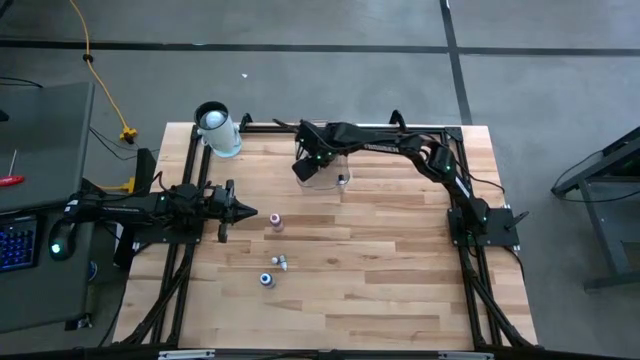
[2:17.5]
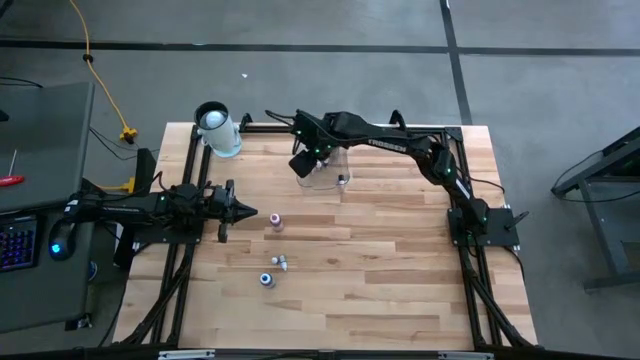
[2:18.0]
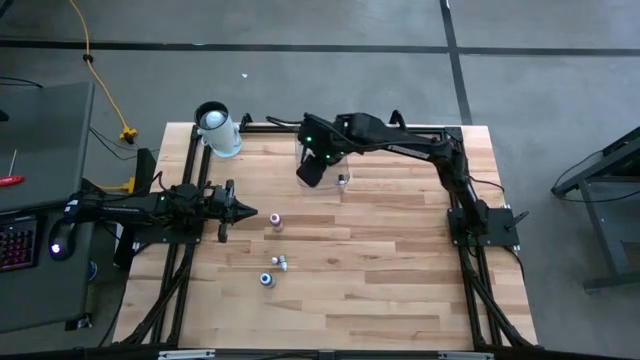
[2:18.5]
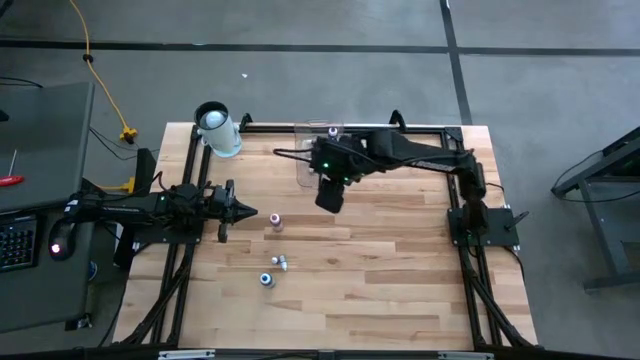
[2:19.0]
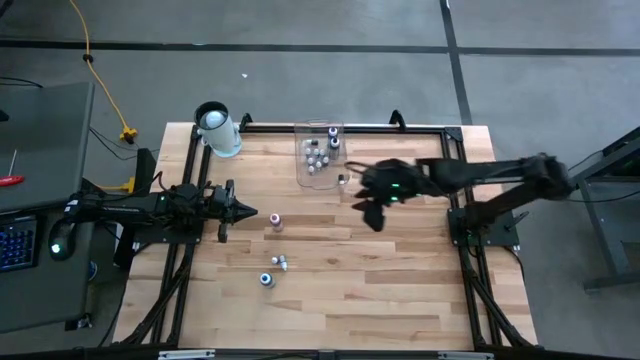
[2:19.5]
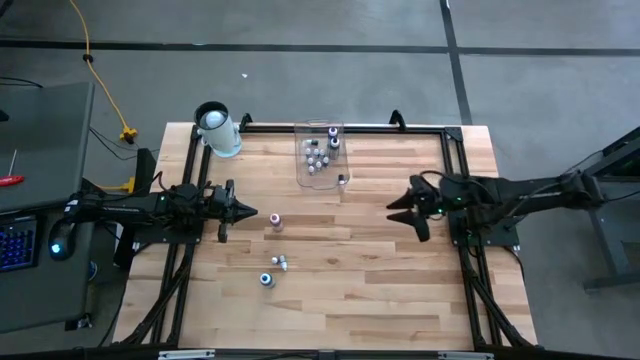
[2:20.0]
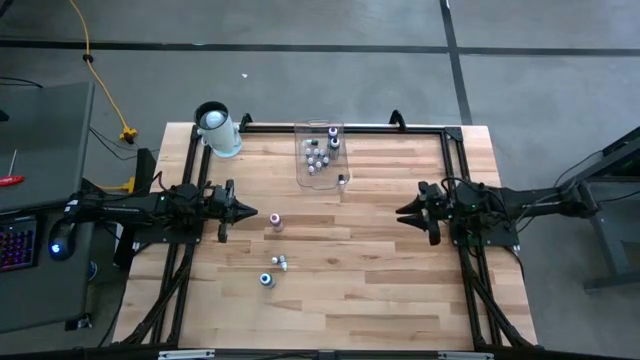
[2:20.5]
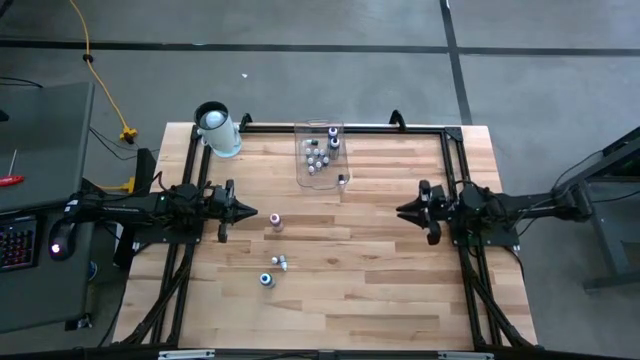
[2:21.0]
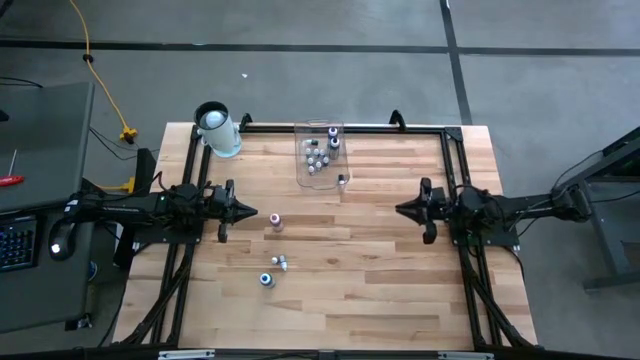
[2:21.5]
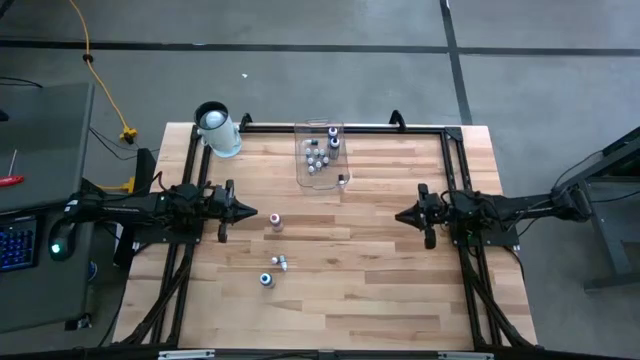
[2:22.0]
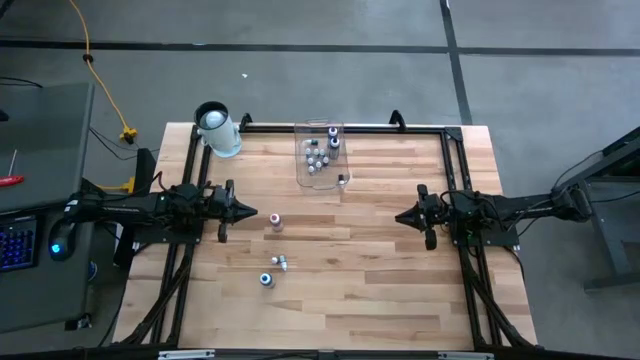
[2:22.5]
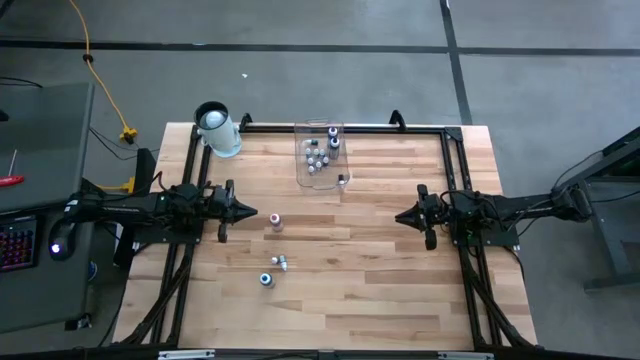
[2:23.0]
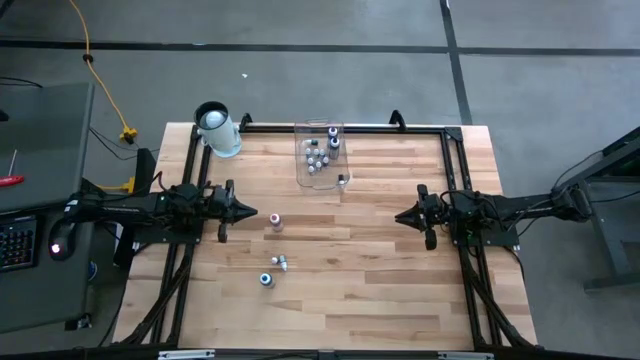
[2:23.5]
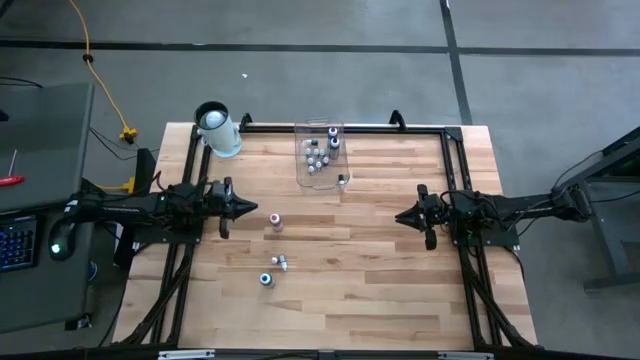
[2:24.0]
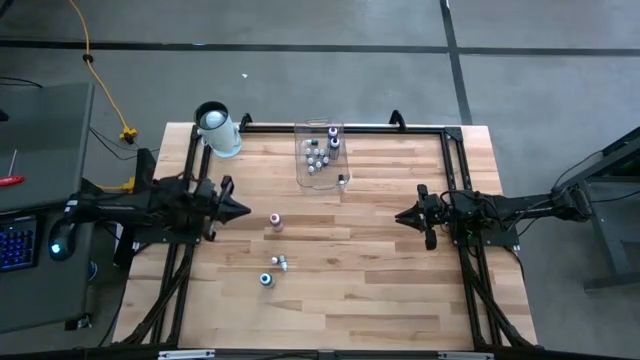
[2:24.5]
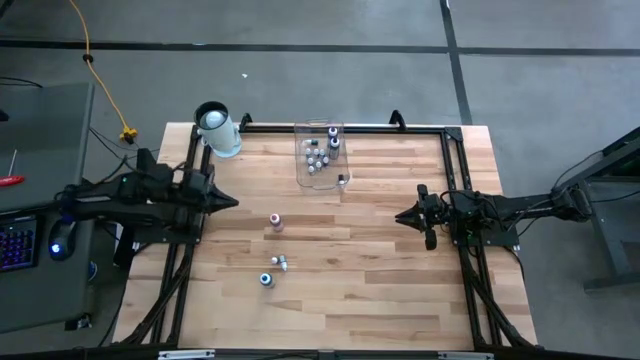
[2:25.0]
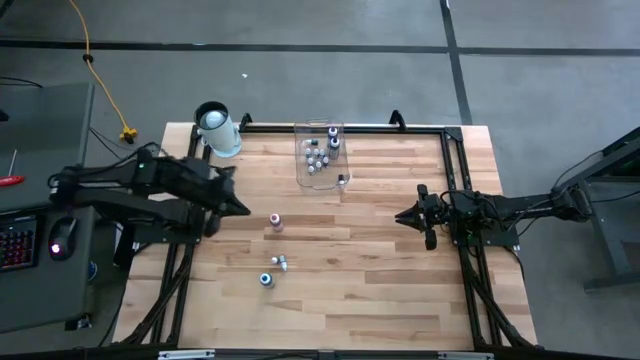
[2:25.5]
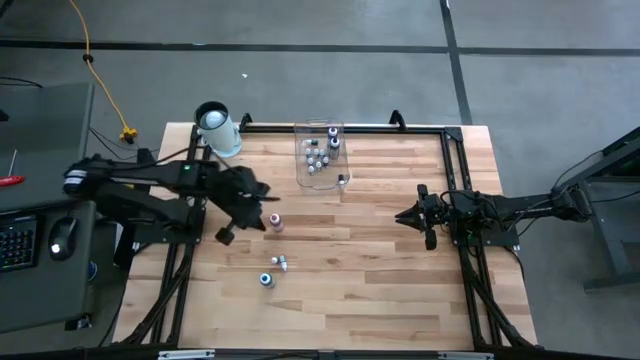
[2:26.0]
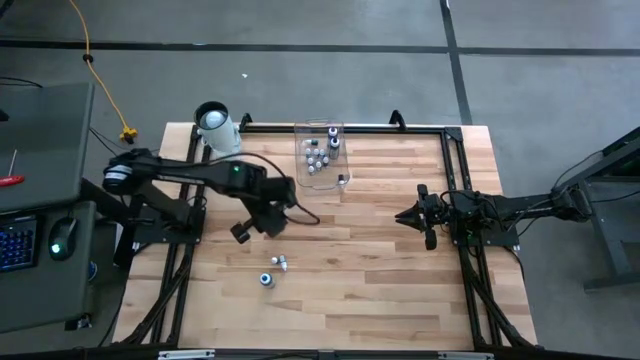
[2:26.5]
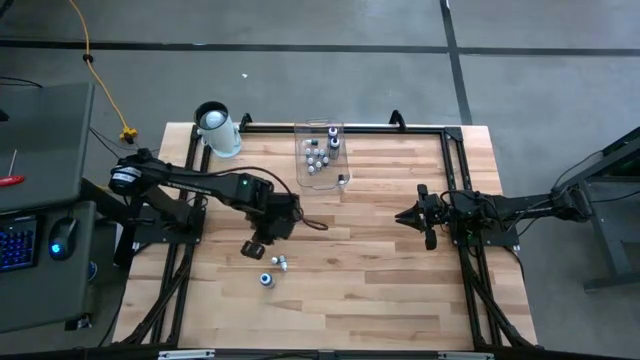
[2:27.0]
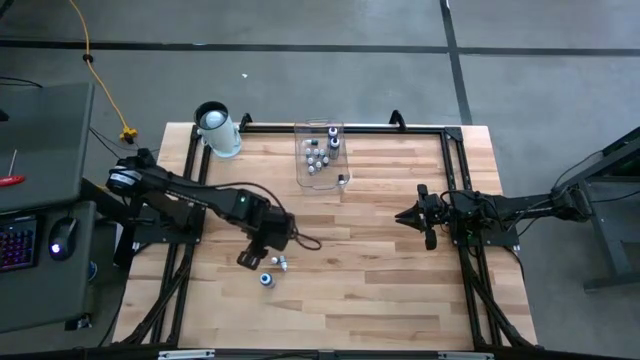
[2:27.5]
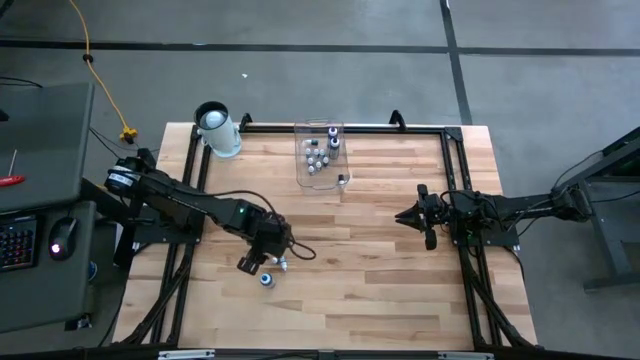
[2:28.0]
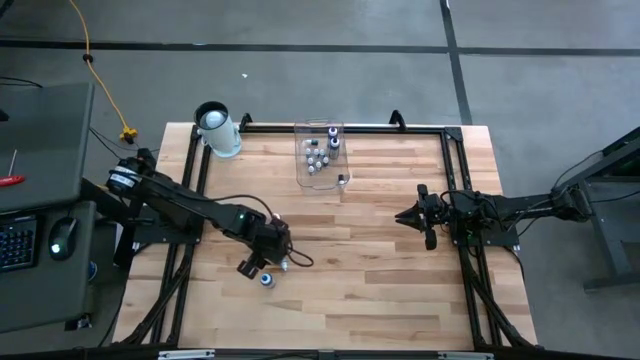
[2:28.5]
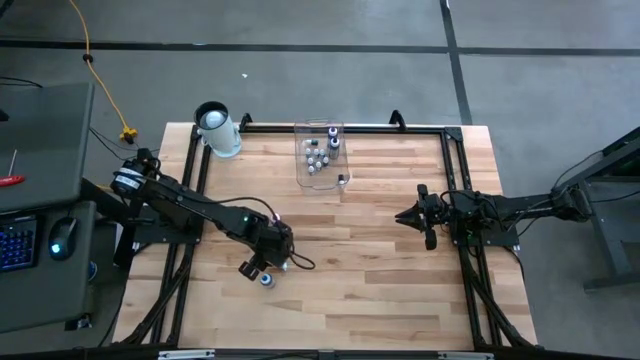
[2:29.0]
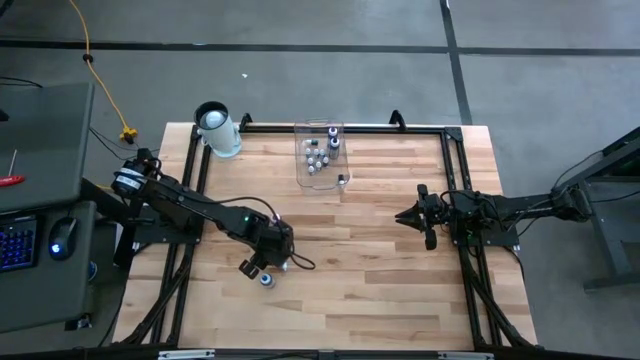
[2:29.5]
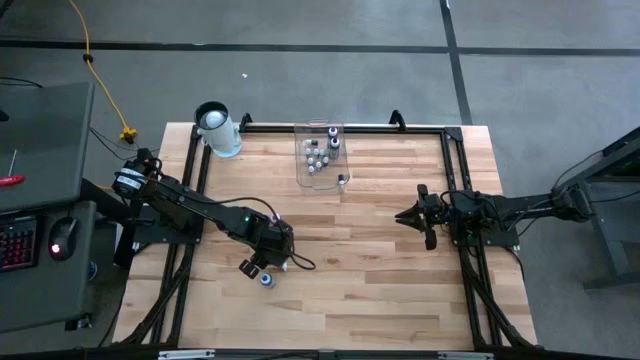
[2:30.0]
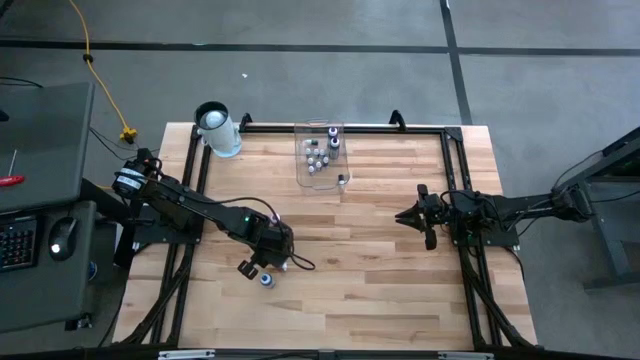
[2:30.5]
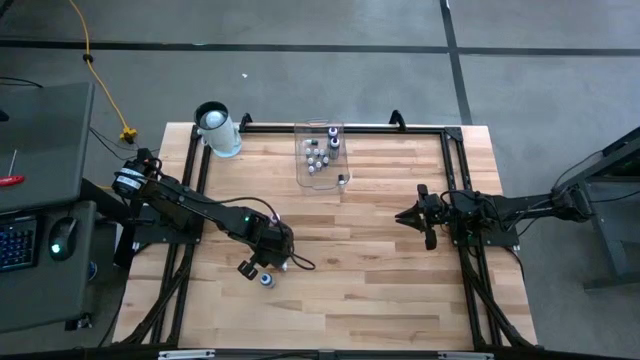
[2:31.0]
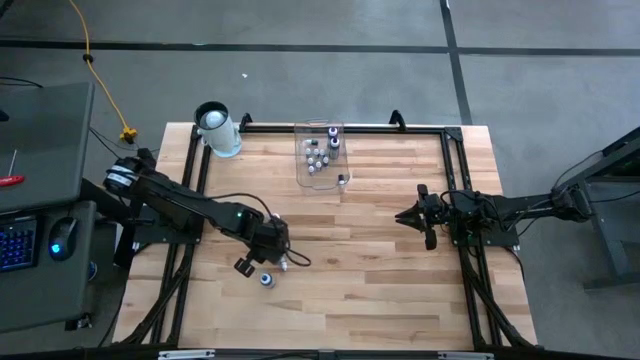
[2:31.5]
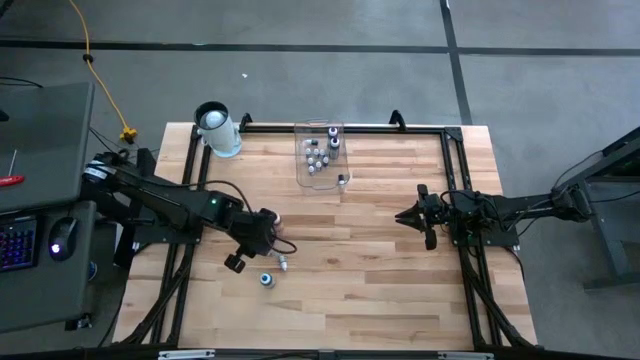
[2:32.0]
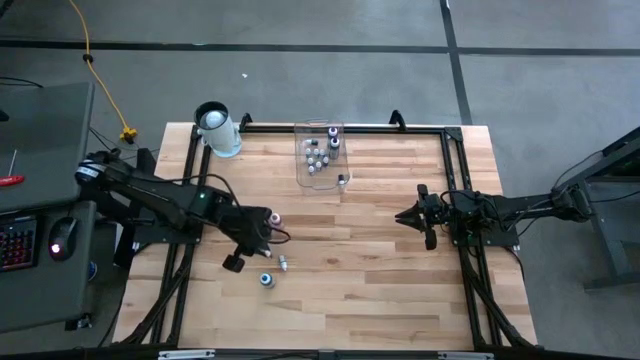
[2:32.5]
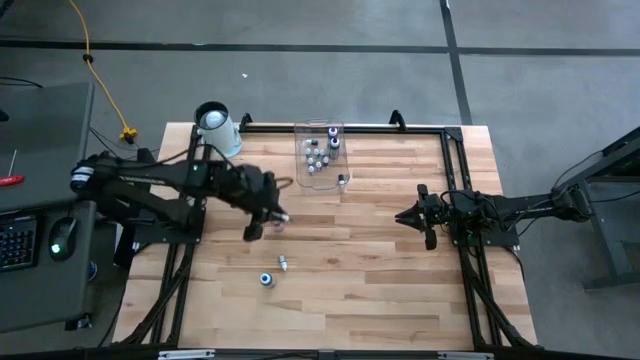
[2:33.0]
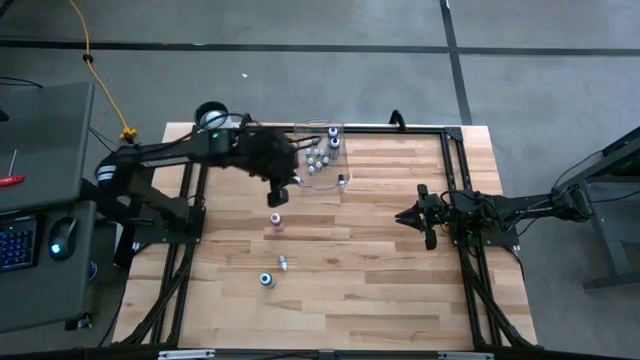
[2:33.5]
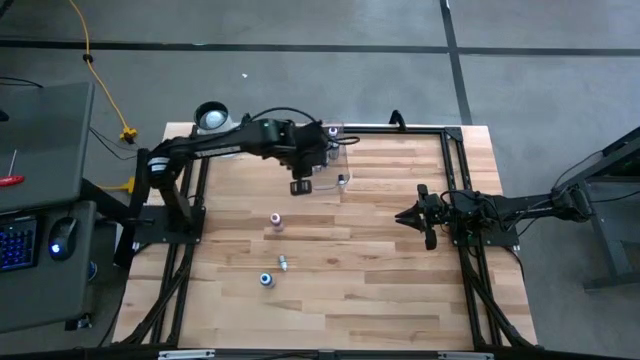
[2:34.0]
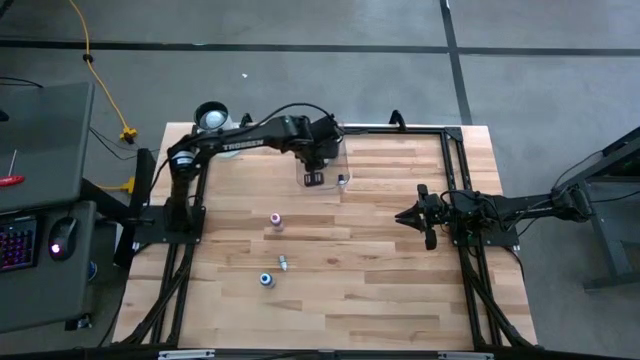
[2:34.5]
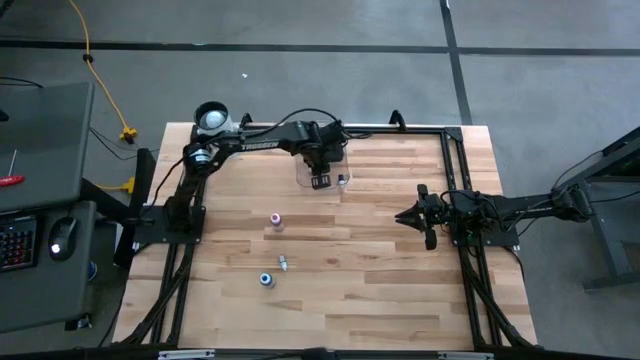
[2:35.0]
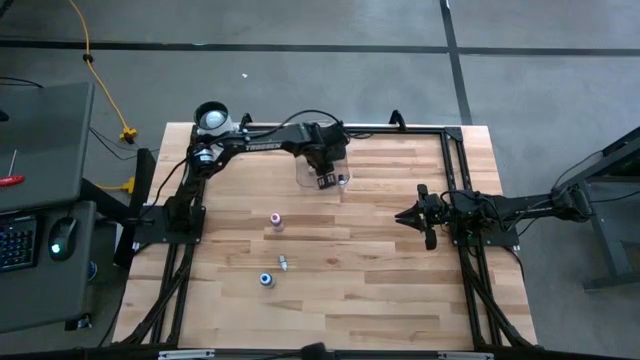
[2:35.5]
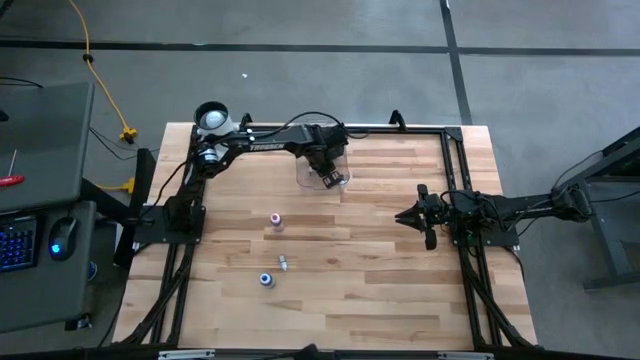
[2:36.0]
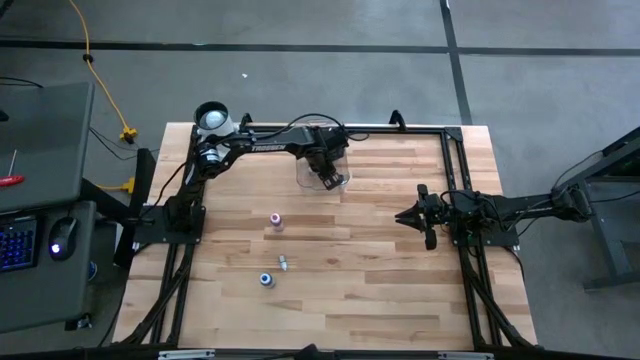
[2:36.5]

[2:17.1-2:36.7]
Task: Pick & Place food coloring
Put the small violet food coloring bottle into the container
